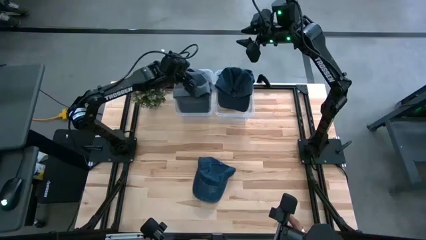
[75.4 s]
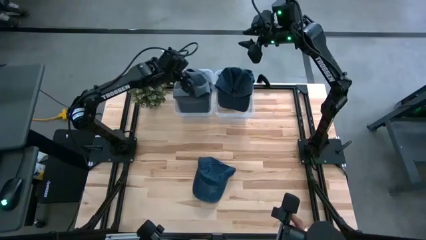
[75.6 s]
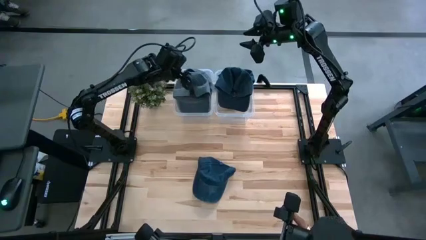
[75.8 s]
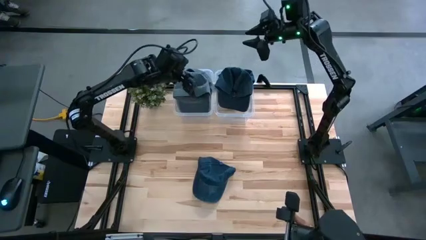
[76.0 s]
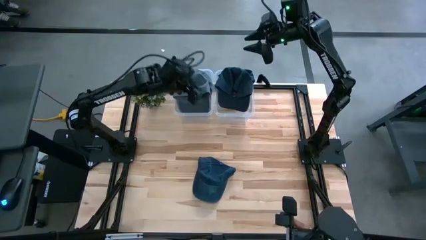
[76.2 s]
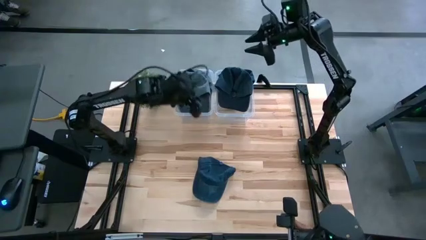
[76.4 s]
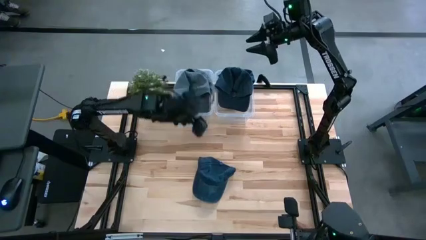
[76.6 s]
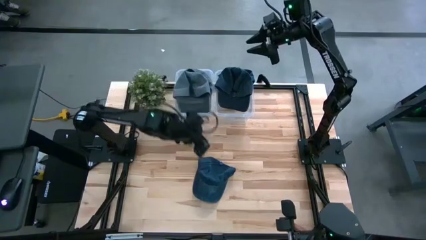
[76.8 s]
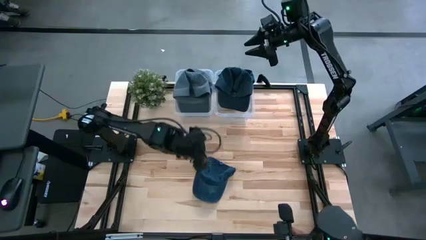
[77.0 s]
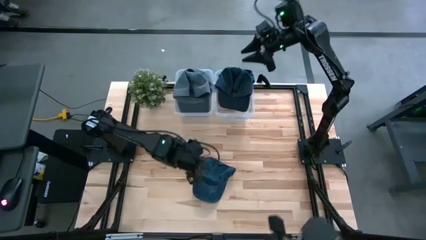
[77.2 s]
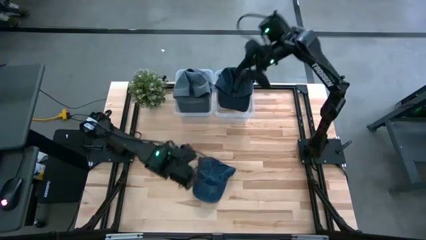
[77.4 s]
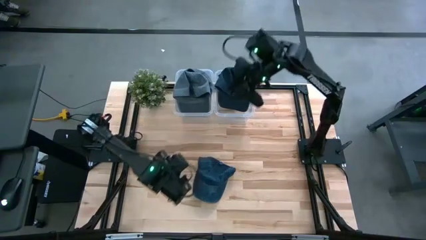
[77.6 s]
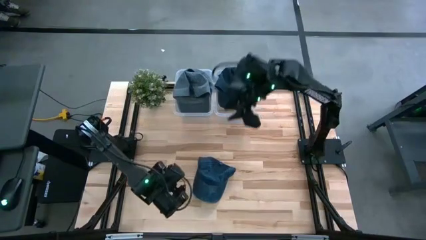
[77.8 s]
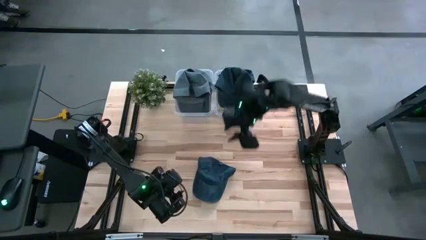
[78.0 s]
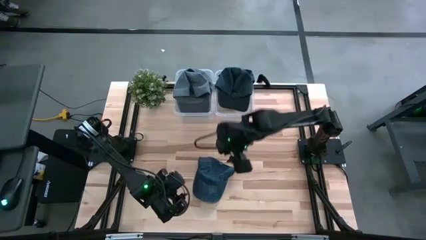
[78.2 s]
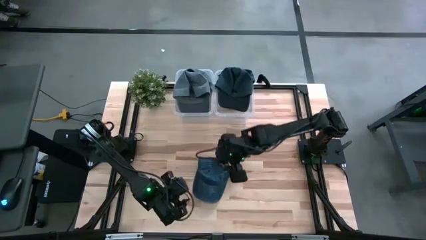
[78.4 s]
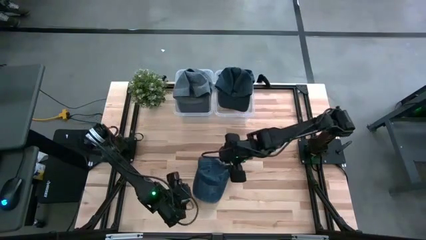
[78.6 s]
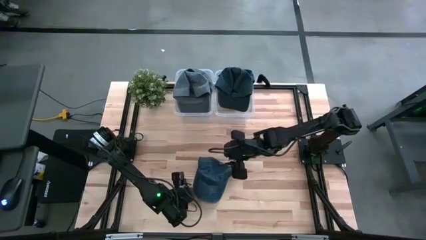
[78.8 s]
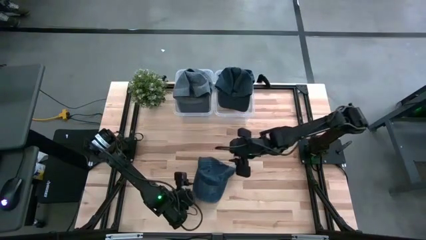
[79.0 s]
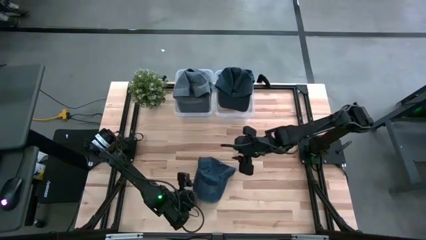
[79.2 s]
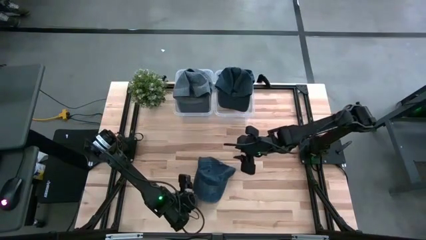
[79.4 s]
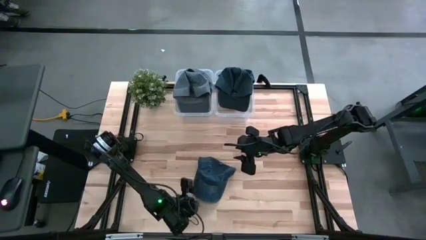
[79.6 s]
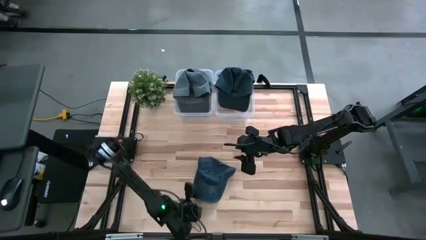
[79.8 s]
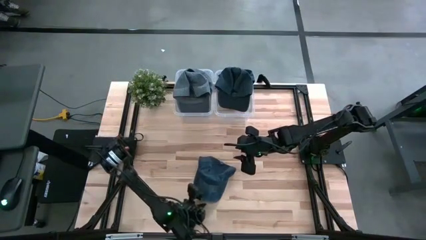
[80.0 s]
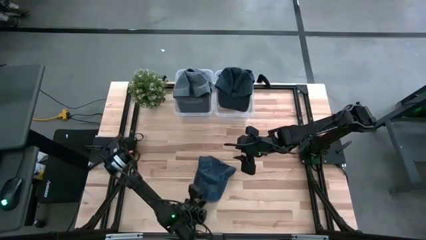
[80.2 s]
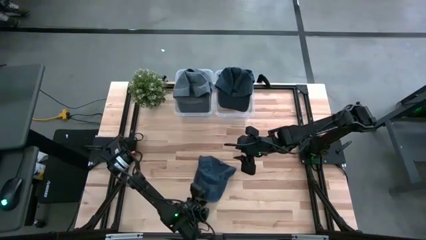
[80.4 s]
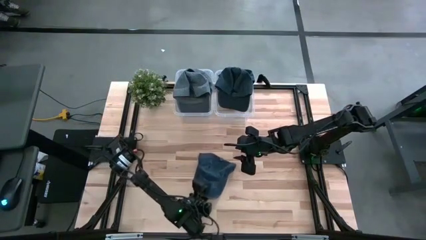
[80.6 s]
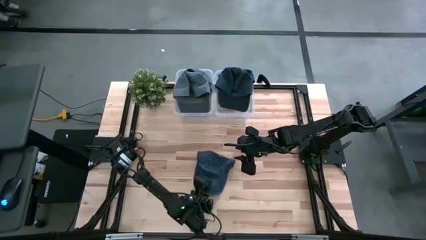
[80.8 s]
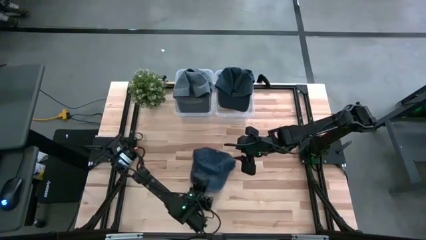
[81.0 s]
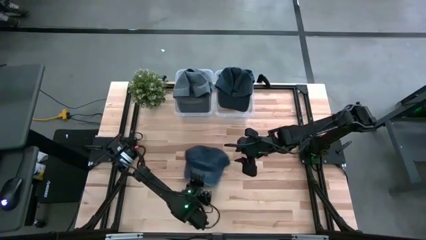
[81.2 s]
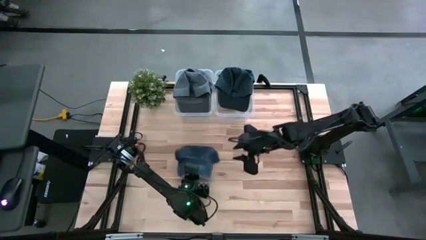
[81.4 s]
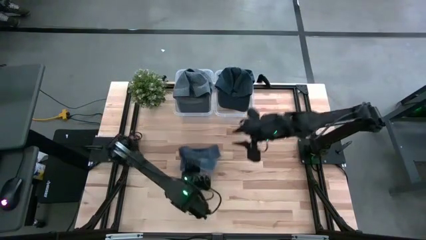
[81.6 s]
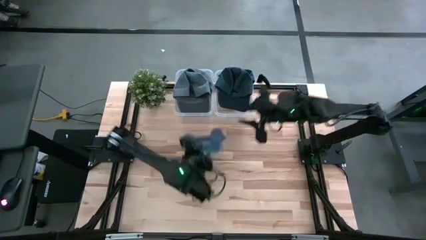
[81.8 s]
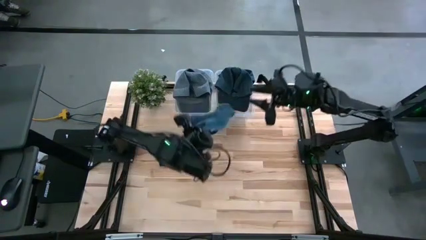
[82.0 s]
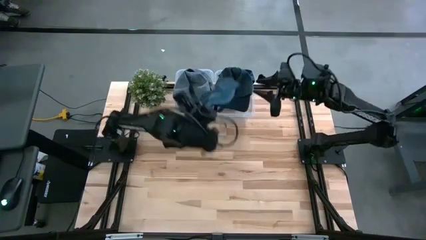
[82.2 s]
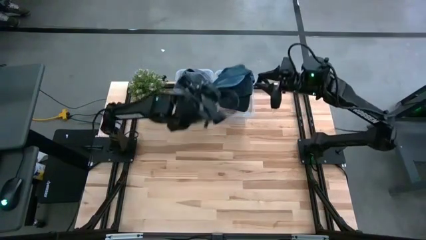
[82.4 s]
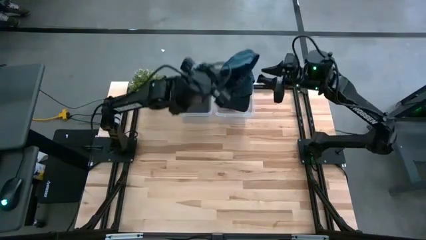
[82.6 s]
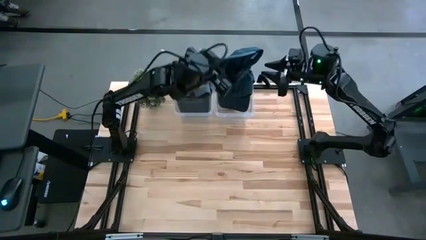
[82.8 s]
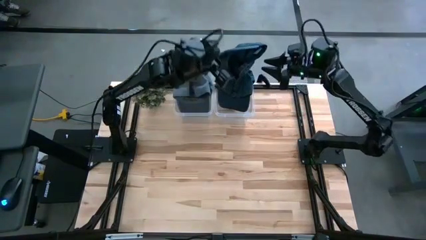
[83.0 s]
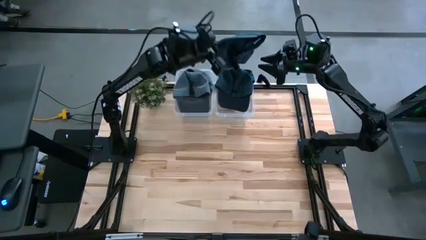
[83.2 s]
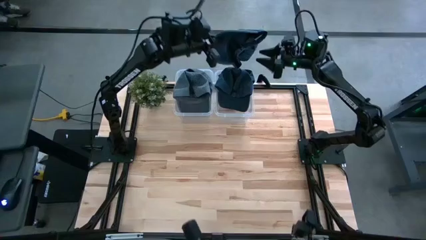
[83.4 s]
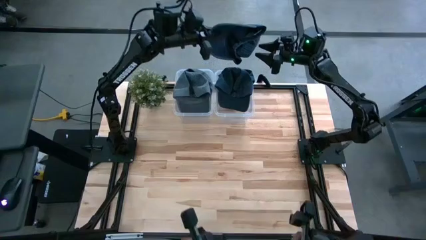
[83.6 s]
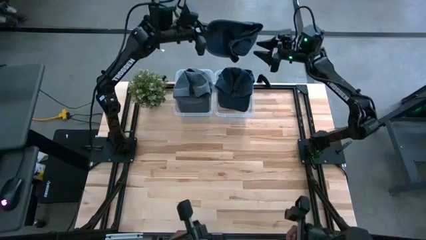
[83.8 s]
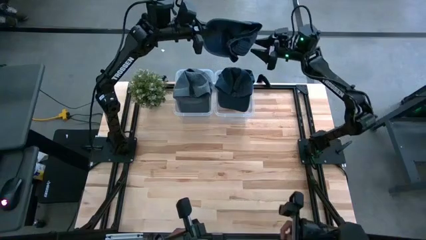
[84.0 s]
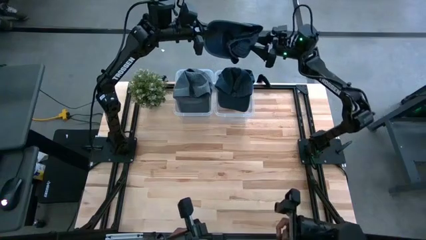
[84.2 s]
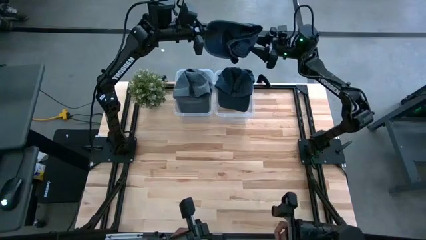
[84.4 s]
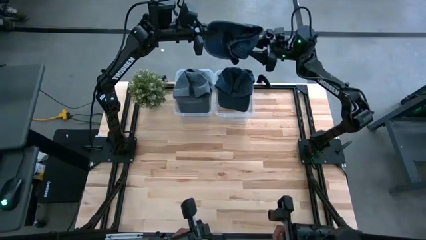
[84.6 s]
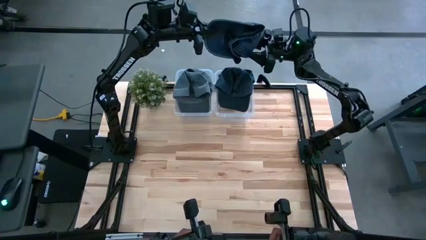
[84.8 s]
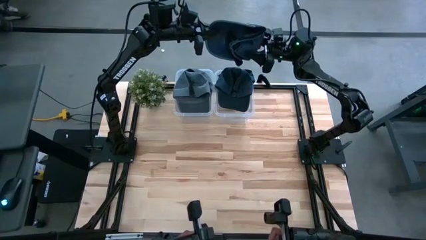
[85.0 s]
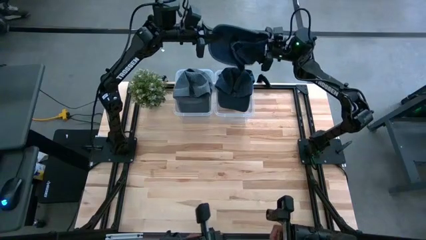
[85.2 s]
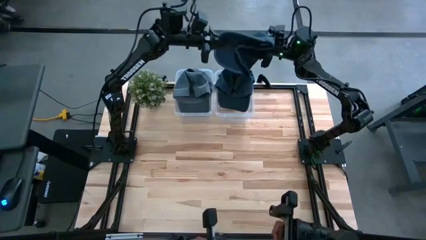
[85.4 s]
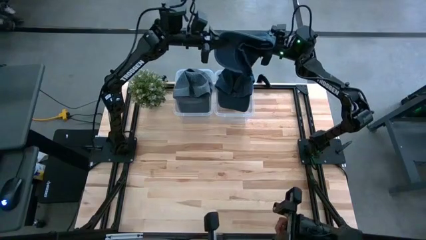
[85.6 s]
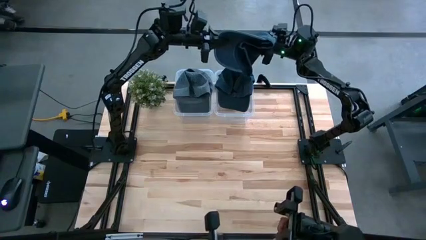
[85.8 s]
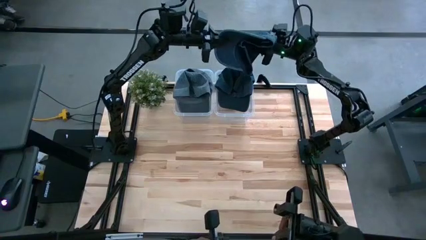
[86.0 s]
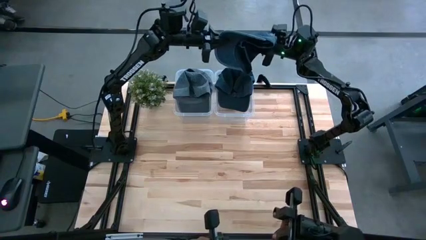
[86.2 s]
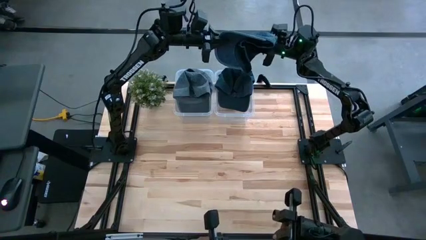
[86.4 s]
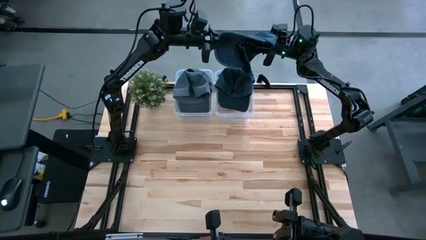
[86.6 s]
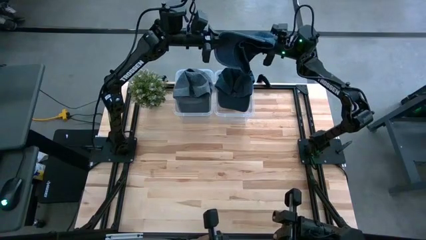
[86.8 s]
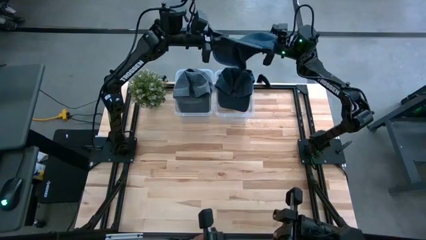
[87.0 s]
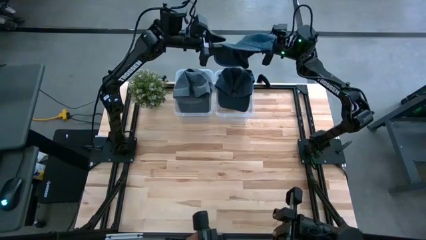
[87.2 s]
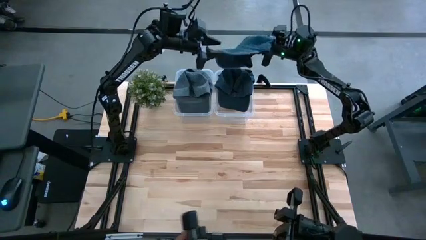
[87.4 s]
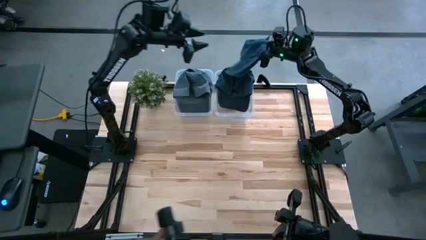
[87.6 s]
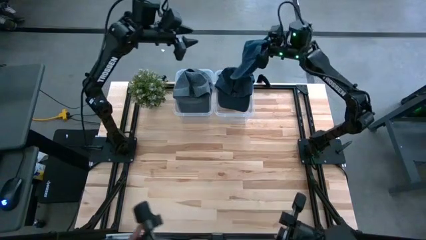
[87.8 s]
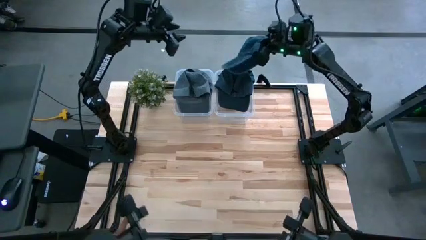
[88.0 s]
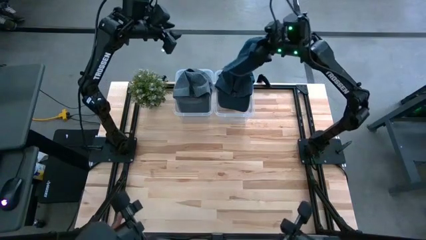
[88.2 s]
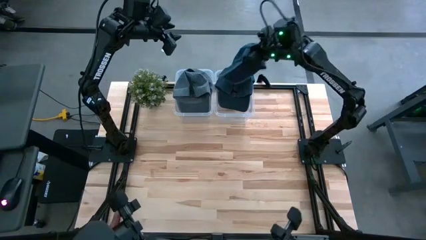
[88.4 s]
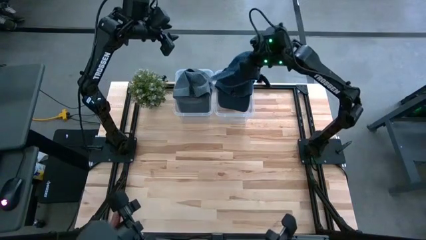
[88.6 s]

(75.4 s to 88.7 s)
Task: Pick & Place hat
Put the blue cap into the right transparent bin

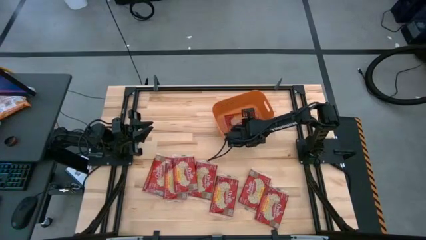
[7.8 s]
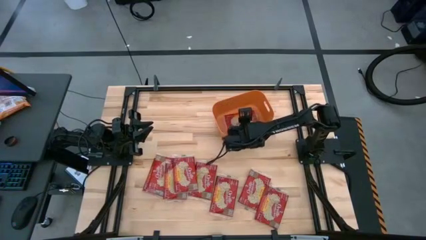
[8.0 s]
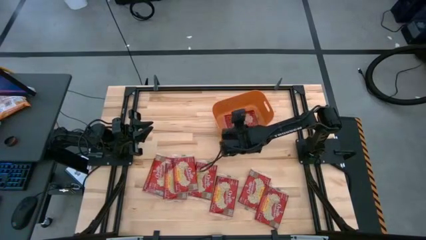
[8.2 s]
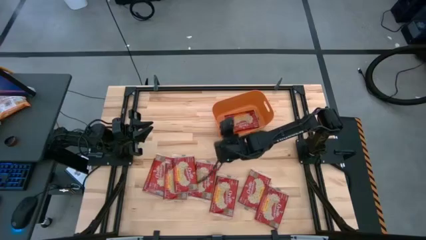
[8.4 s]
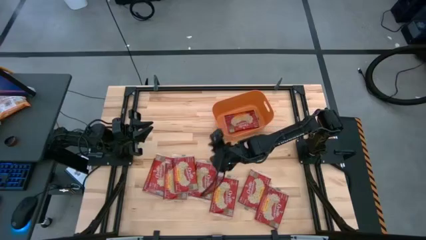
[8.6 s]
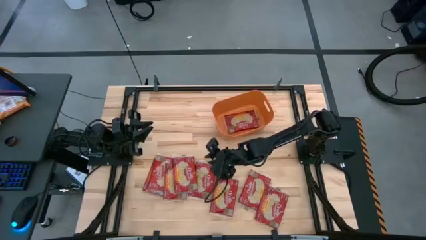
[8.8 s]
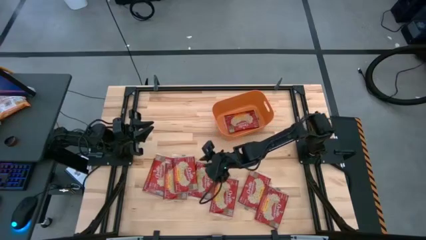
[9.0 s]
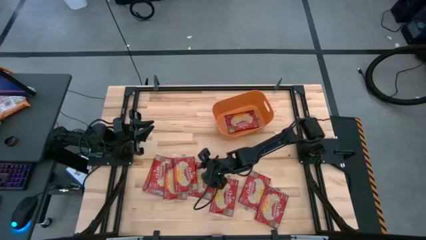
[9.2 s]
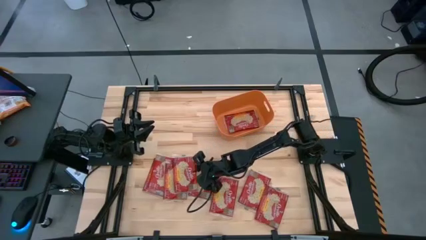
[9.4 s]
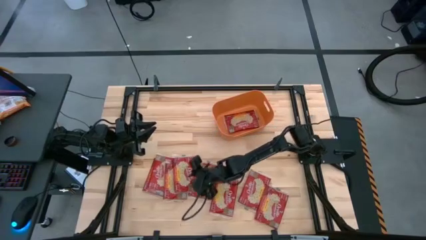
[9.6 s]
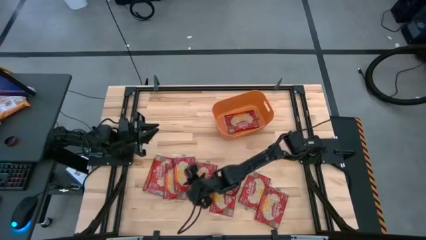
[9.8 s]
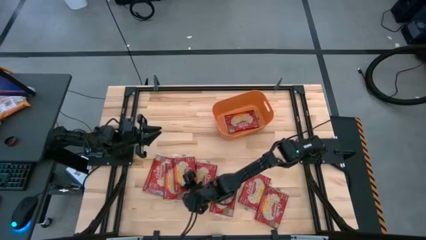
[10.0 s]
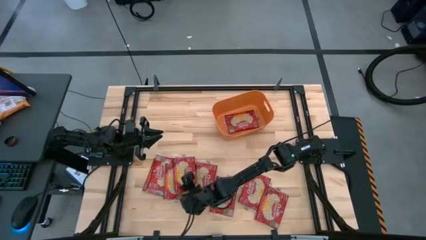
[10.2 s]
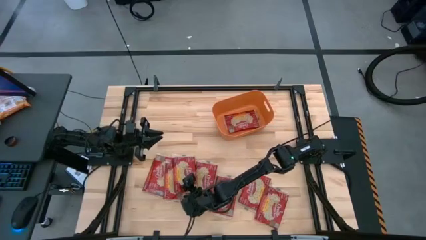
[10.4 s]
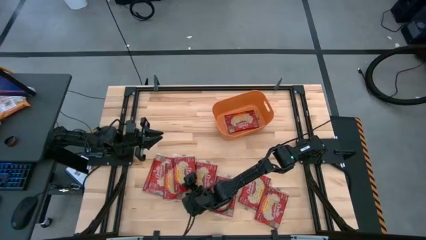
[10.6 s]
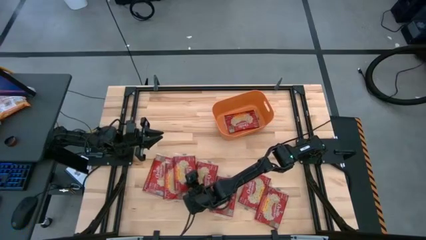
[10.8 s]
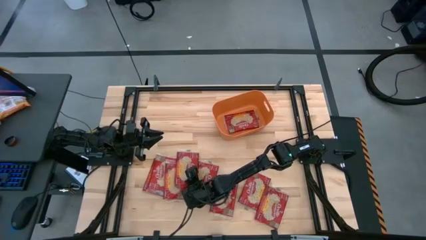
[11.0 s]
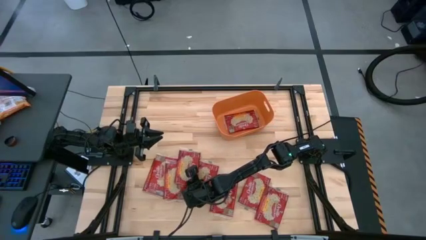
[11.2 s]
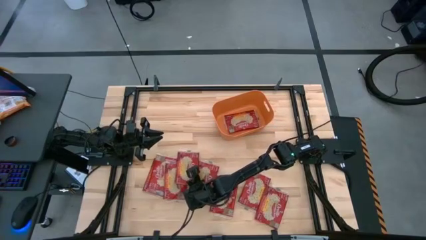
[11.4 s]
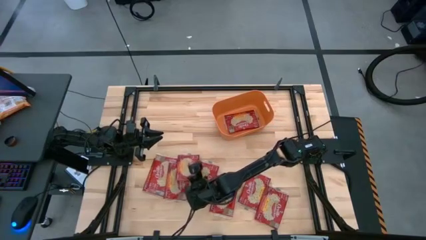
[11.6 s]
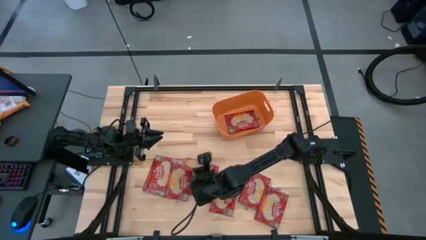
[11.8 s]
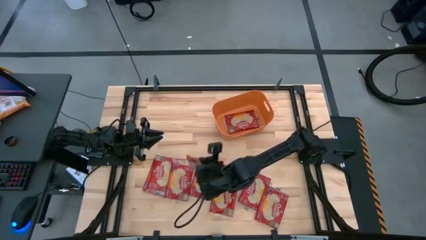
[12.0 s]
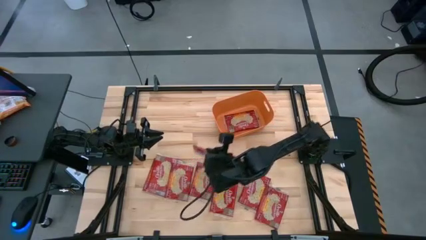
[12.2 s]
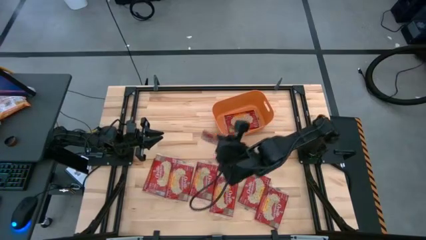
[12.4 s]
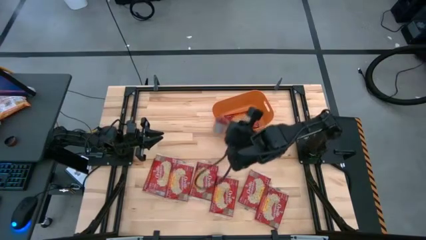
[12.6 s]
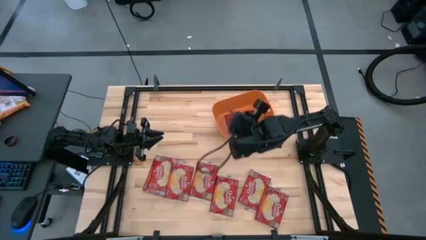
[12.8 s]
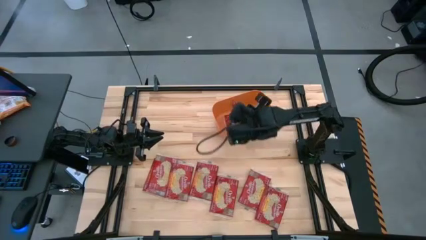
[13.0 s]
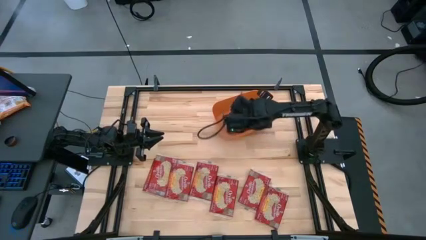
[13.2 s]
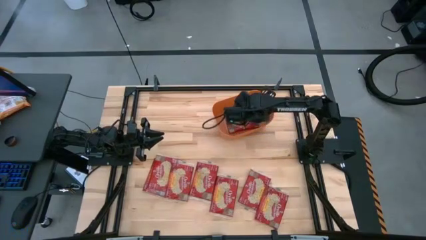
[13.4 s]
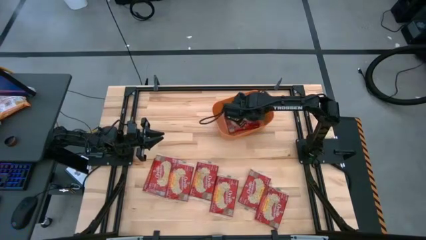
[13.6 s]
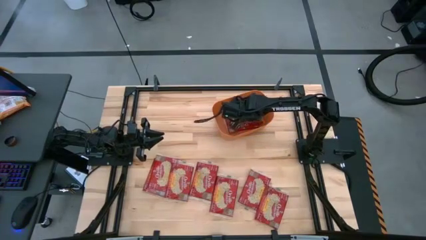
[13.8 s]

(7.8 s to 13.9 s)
Task: Sort popcorn bags into baskets
Put the popcorn pack into the orange bin
